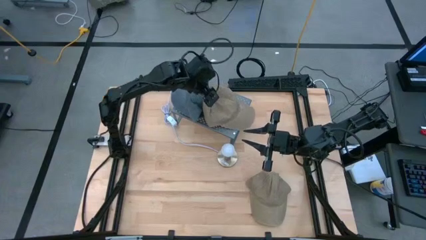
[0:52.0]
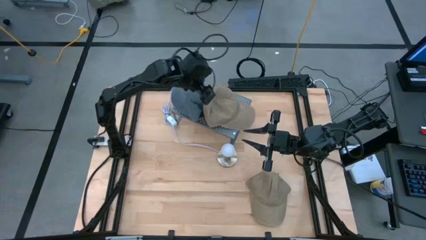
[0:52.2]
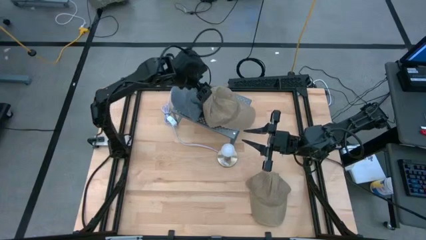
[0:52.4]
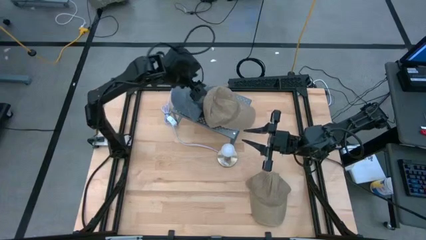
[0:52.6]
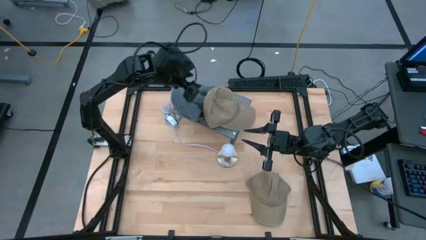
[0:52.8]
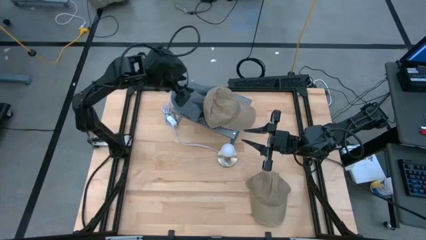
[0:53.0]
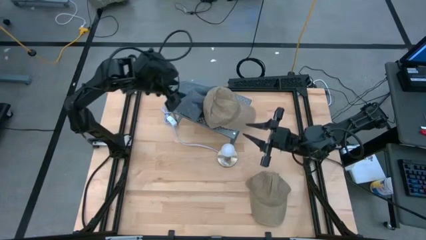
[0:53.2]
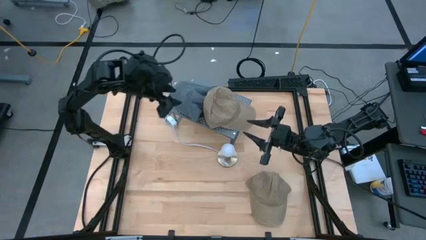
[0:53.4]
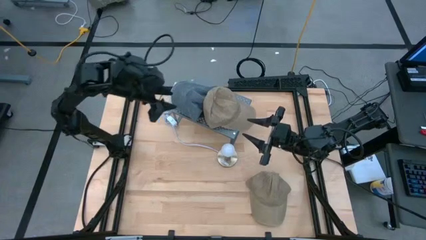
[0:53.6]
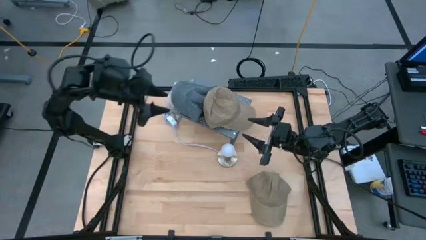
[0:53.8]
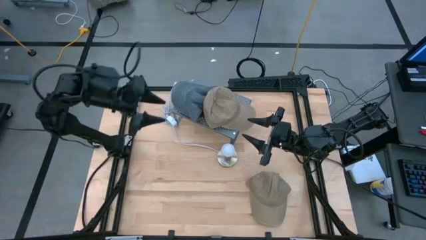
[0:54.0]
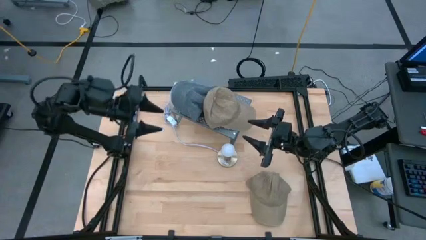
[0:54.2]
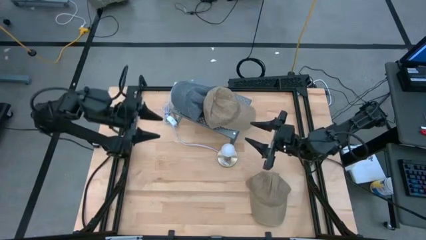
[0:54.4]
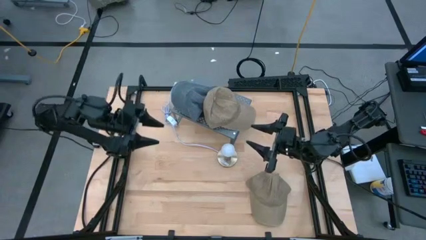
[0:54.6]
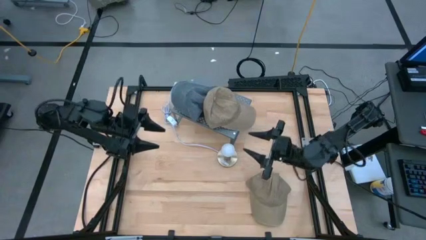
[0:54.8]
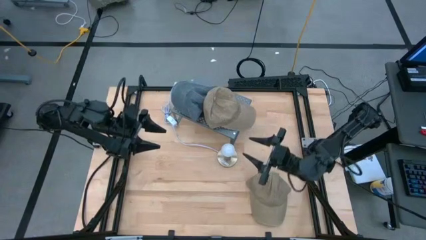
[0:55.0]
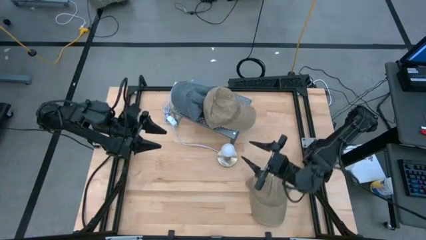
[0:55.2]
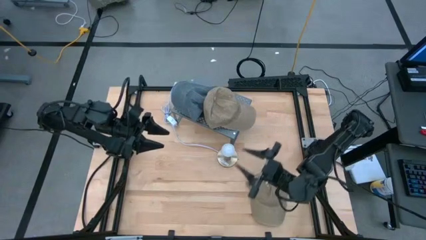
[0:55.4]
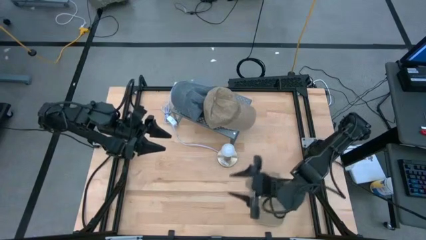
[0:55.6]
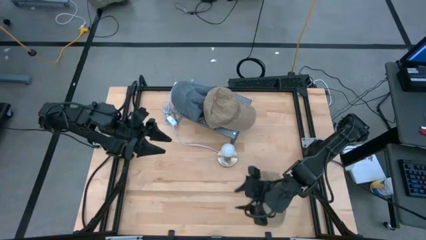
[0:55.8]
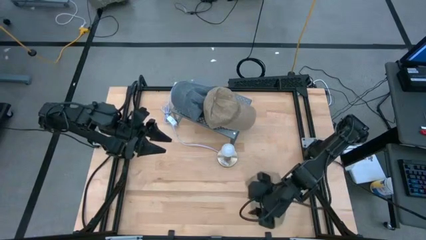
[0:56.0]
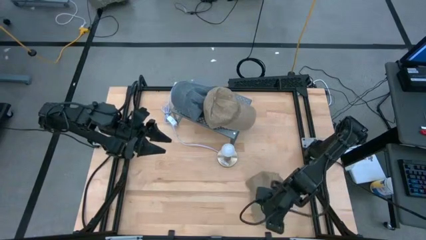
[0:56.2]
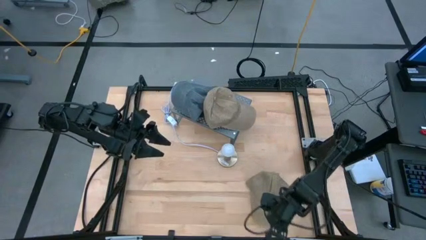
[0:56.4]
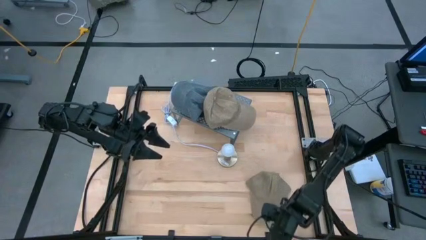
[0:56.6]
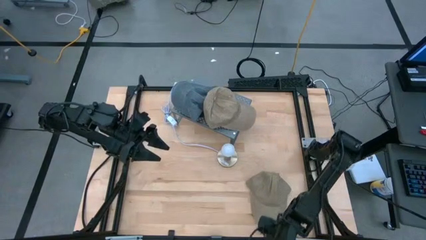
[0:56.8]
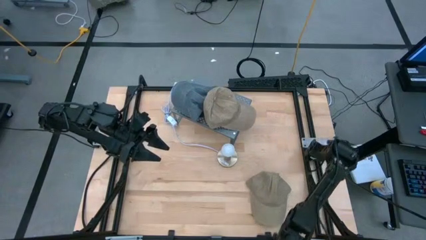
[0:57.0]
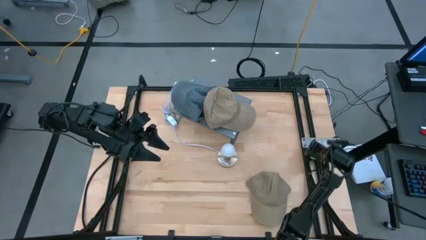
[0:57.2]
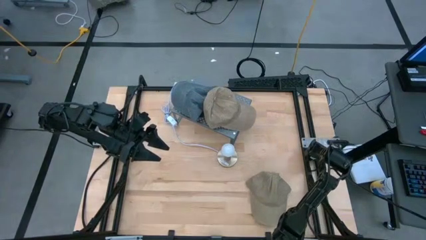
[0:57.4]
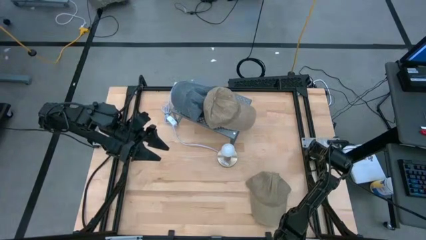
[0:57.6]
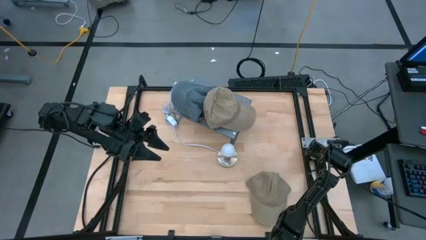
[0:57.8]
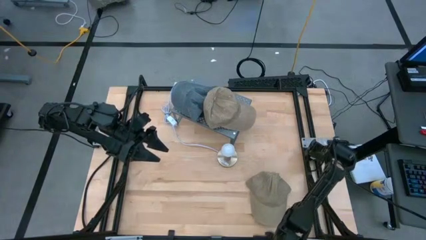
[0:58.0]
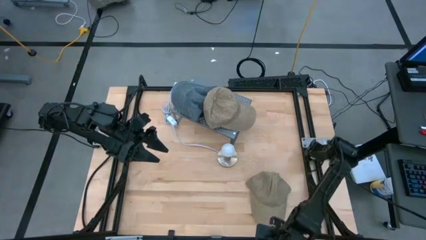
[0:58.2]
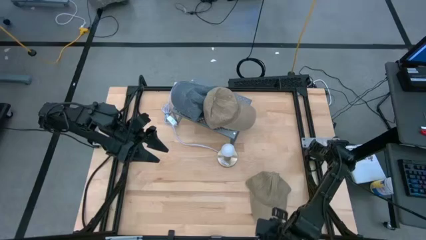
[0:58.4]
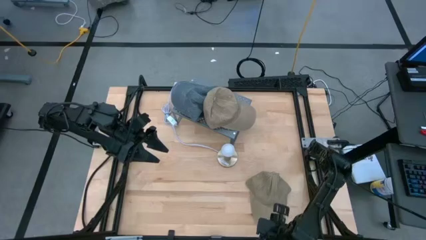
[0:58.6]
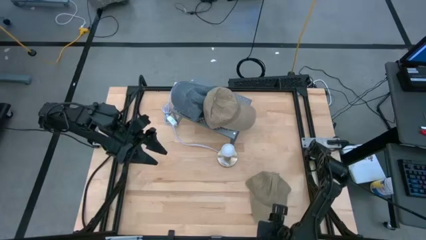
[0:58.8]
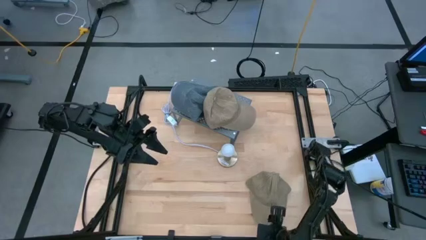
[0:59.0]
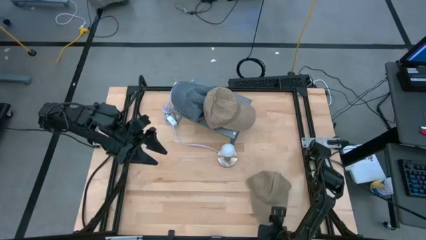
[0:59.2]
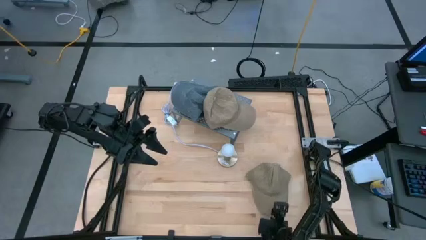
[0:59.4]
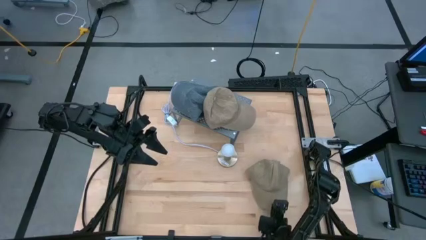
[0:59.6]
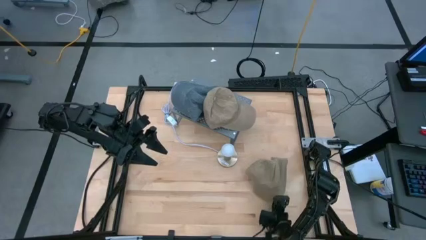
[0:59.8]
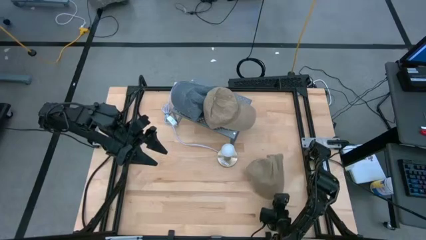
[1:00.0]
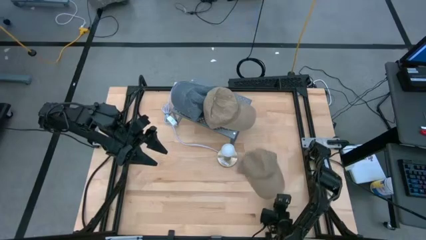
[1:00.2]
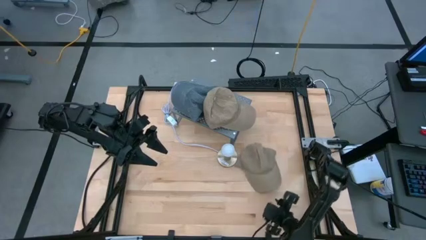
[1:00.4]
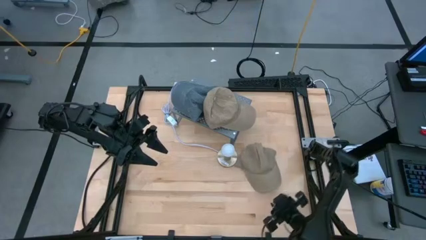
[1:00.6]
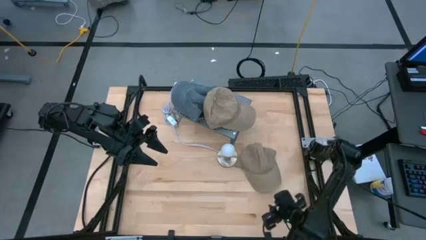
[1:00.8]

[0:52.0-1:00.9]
Task: Pick & Place hat
Stack the brown cap on the other brown cap on the shelf

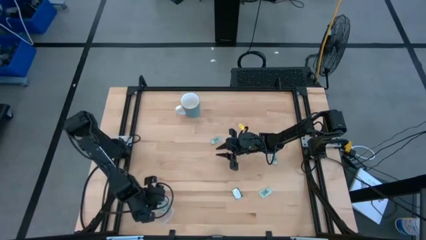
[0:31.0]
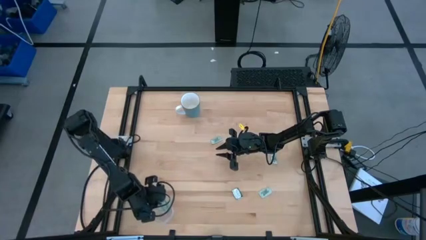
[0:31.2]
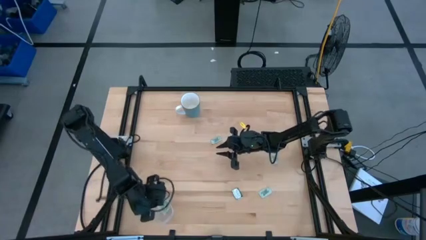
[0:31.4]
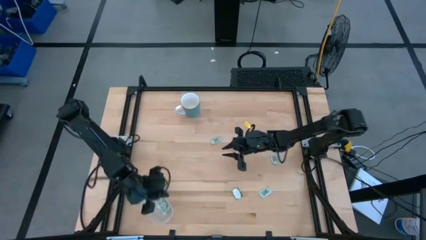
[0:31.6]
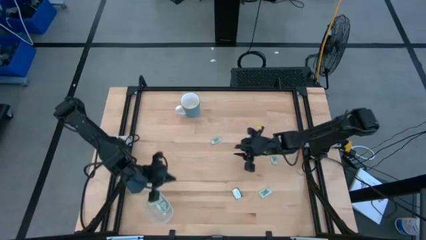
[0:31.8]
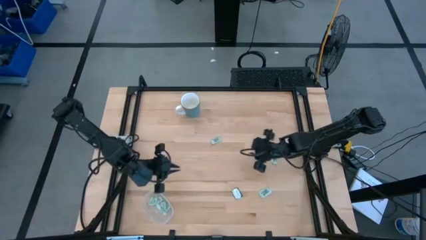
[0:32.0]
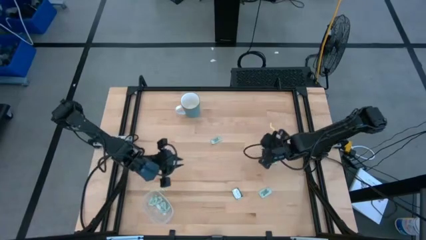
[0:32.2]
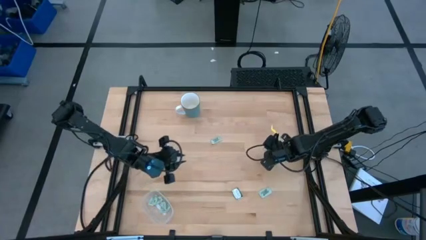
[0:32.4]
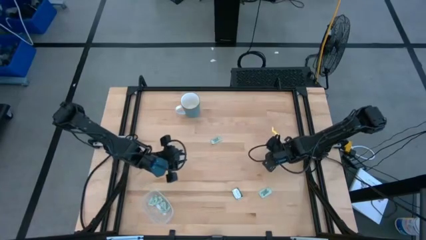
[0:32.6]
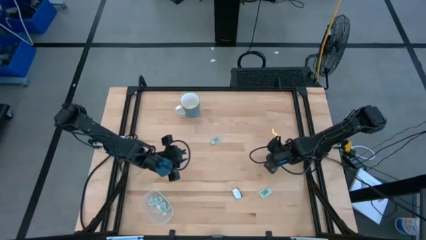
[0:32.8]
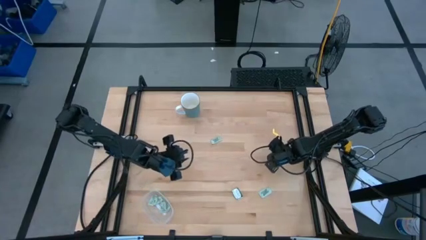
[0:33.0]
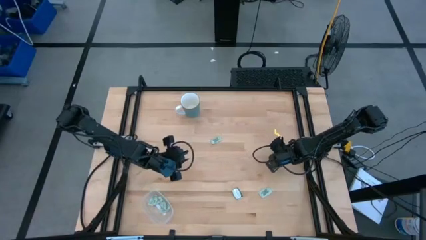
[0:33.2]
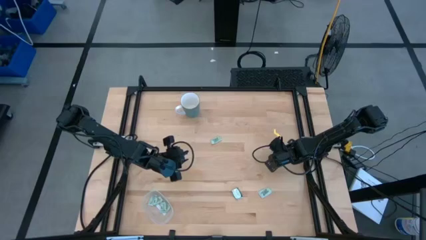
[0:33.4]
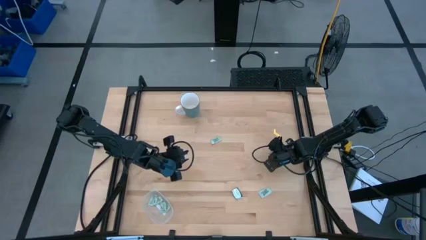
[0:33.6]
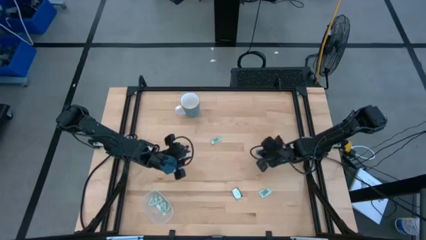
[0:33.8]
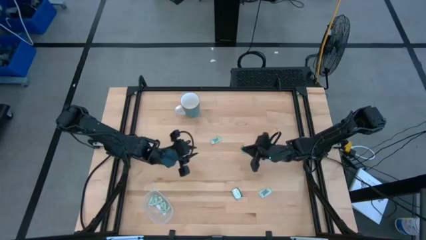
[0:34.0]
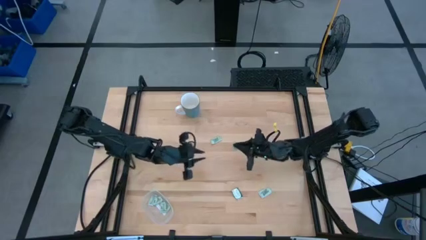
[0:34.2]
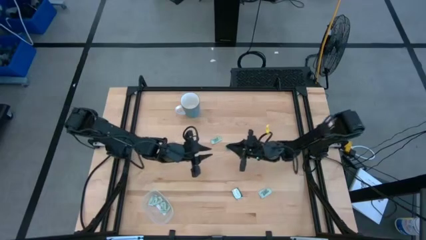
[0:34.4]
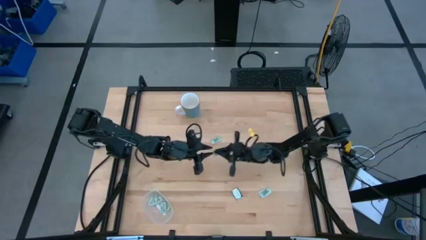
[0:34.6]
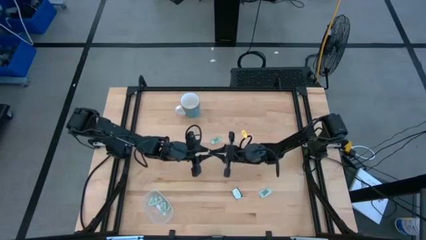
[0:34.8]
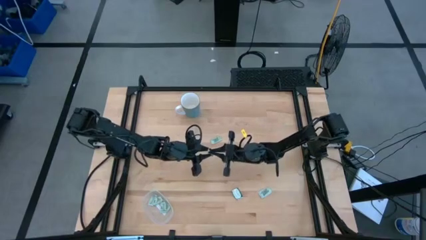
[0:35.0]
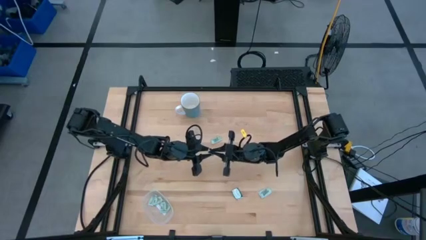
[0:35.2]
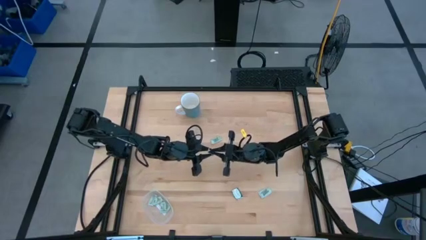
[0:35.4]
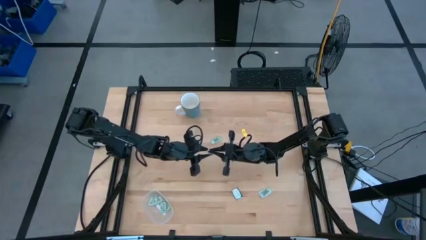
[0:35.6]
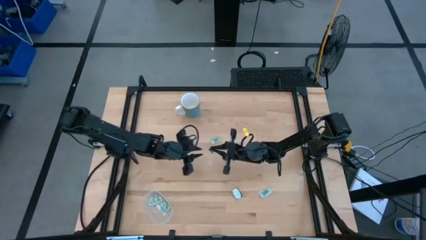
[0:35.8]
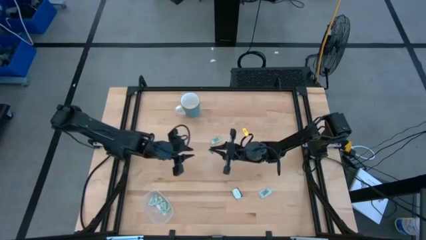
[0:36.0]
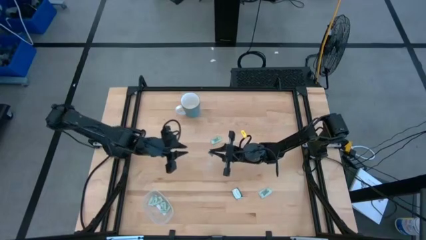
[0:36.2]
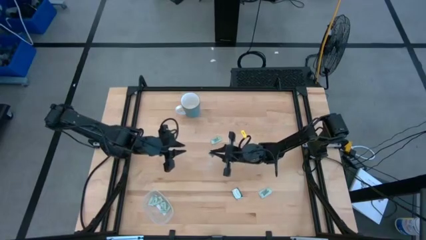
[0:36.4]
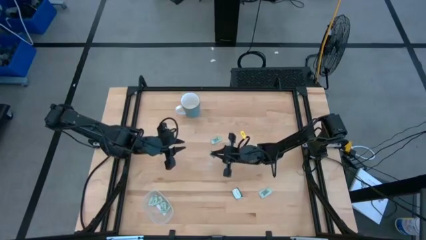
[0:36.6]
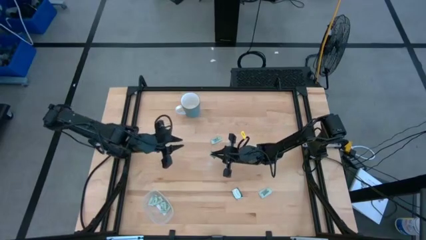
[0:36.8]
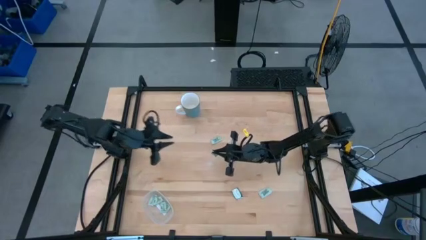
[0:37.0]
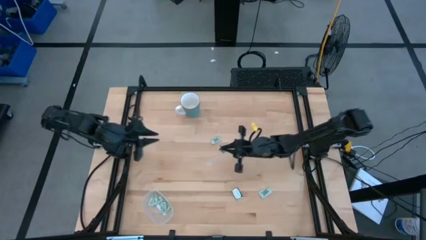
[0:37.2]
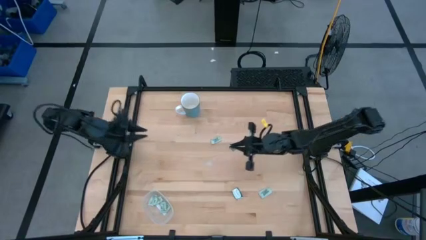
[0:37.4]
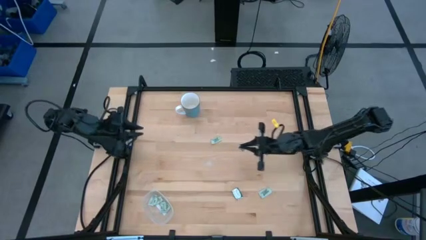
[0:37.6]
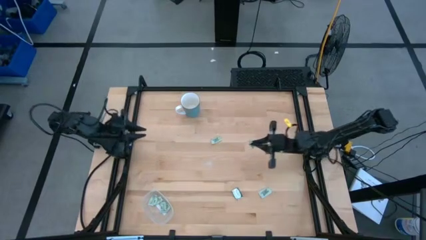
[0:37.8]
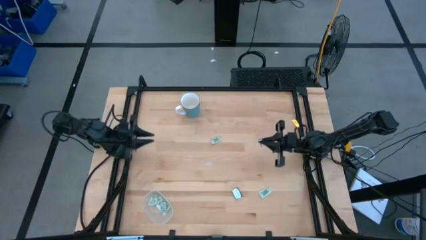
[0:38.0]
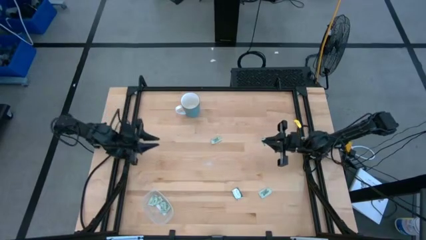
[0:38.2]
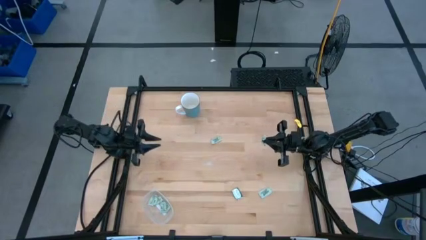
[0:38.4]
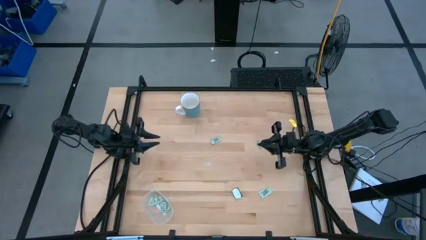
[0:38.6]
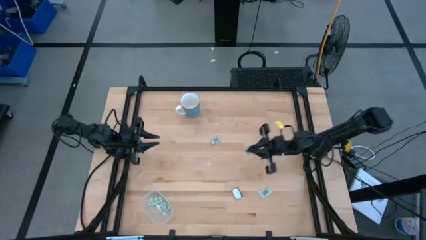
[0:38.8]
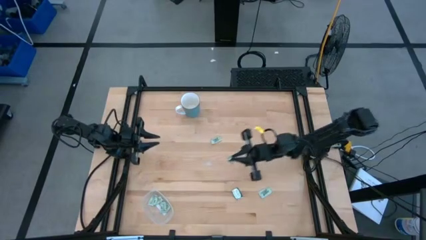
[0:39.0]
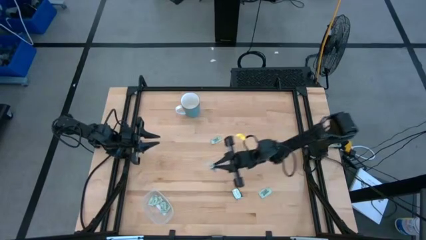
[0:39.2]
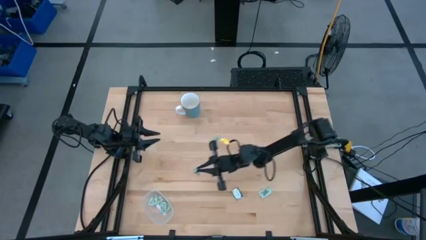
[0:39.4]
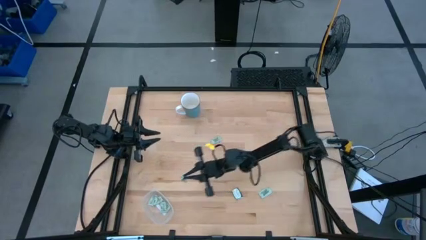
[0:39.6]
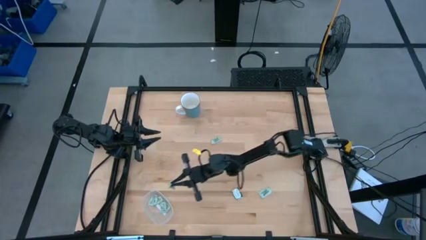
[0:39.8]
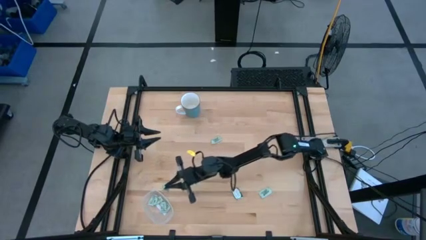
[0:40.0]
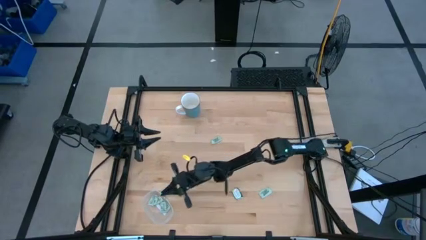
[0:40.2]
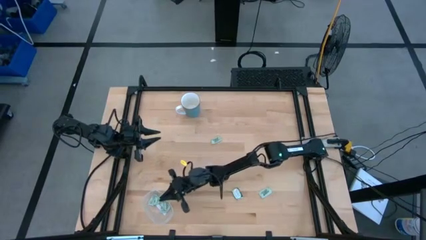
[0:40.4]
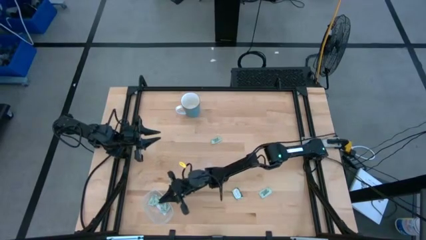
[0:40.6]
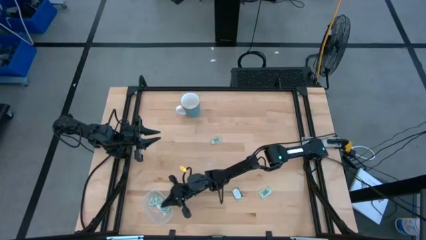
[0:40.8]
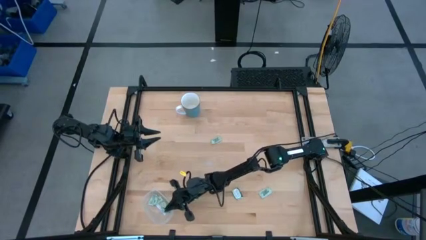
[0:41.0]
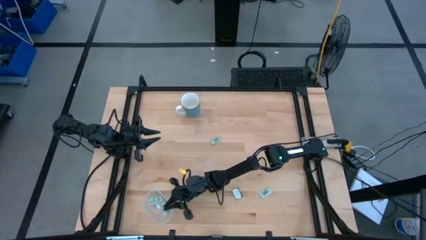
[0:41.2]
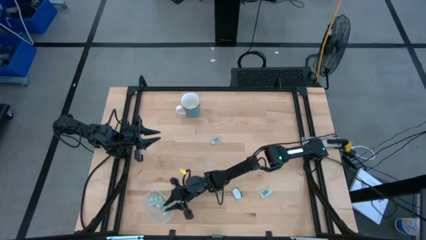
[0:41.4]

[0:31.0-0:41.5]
Task: Pick and place Stevia / Truvia into bins
Put the stevia packet into the transparent container
